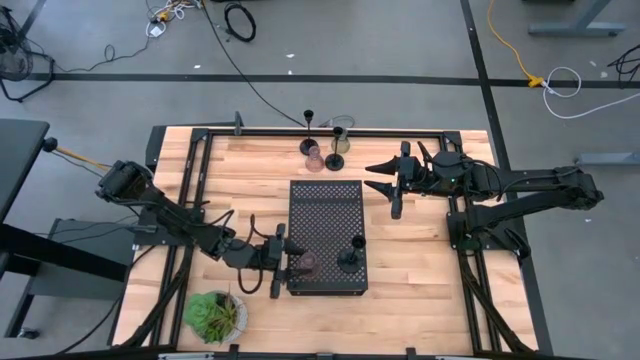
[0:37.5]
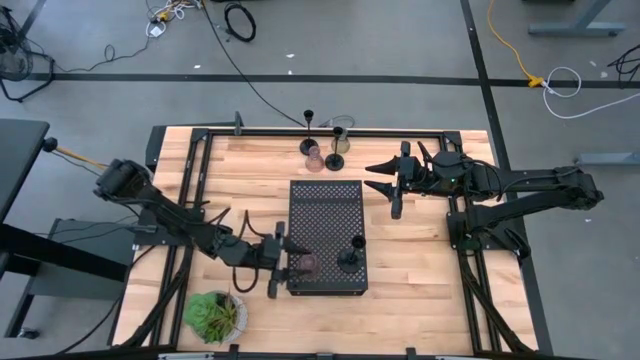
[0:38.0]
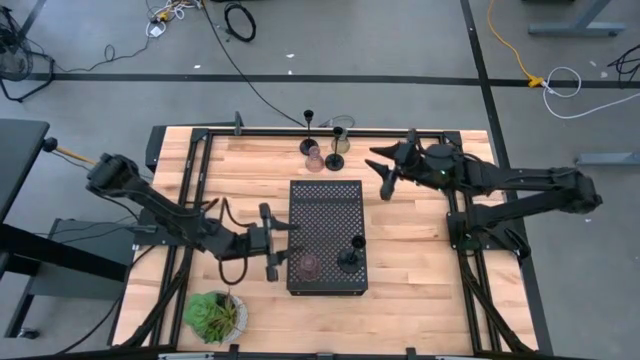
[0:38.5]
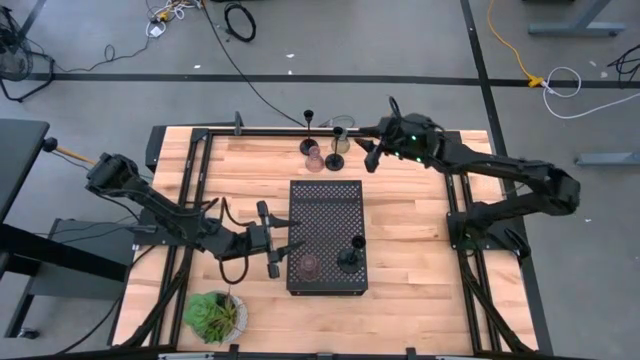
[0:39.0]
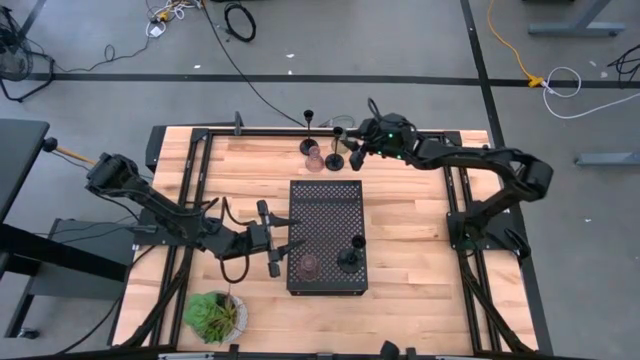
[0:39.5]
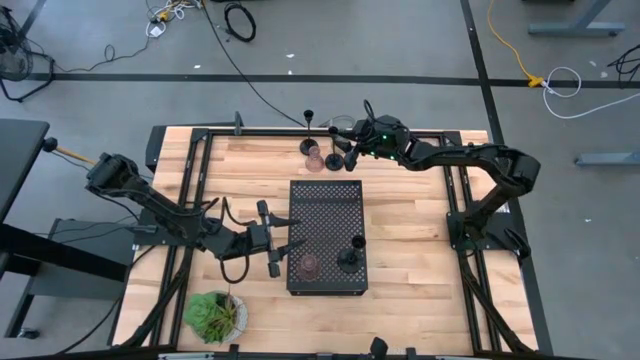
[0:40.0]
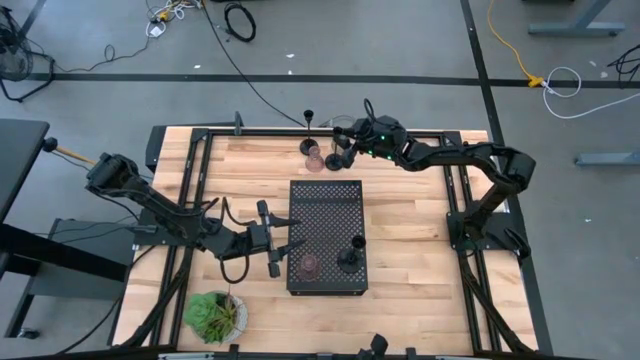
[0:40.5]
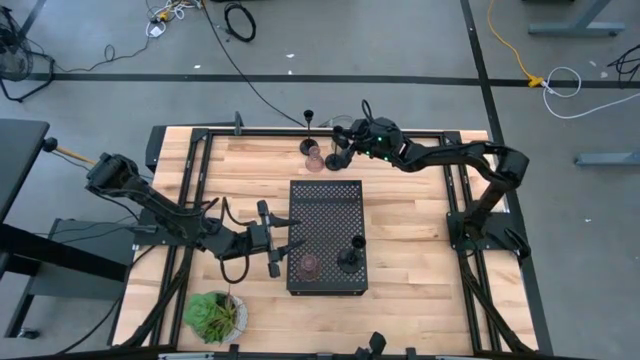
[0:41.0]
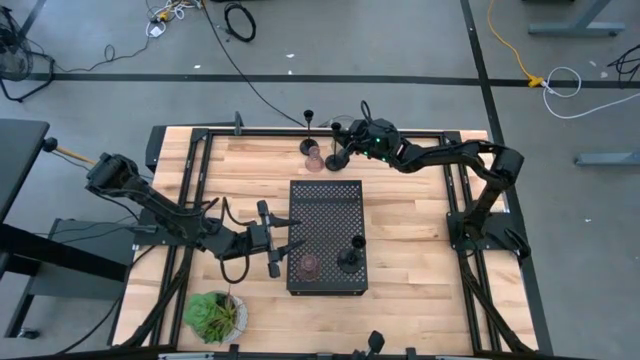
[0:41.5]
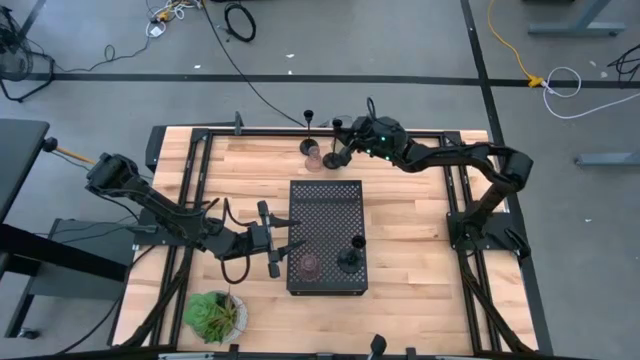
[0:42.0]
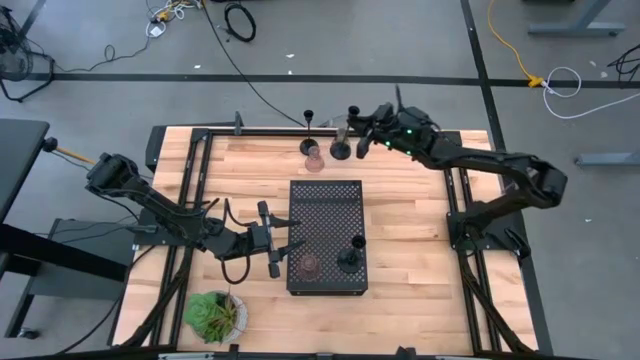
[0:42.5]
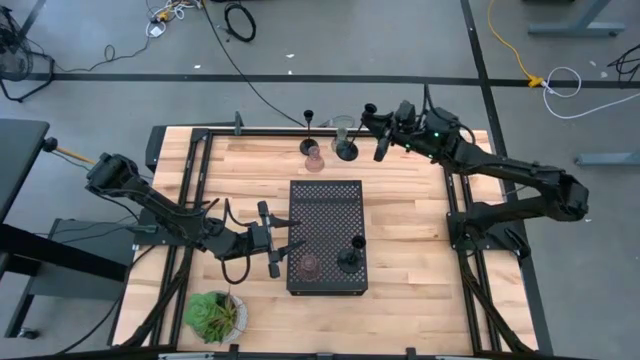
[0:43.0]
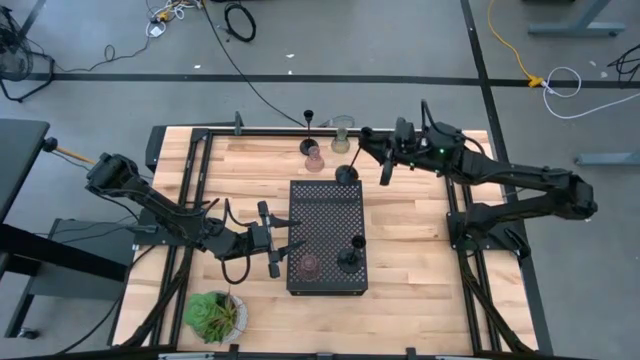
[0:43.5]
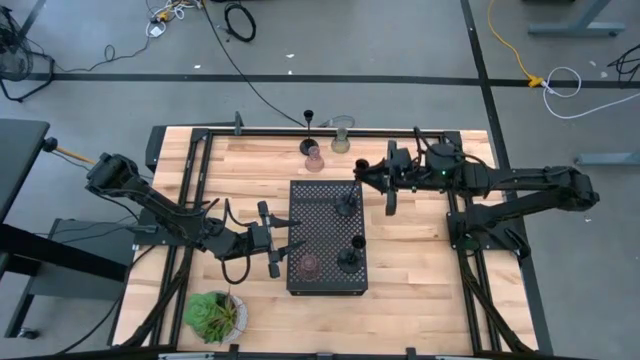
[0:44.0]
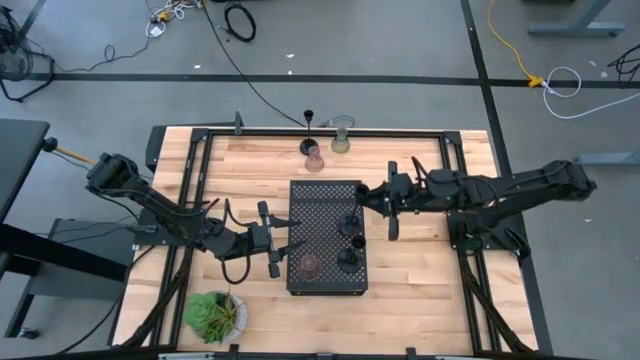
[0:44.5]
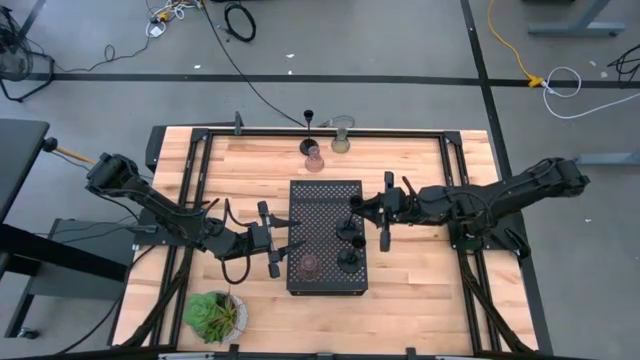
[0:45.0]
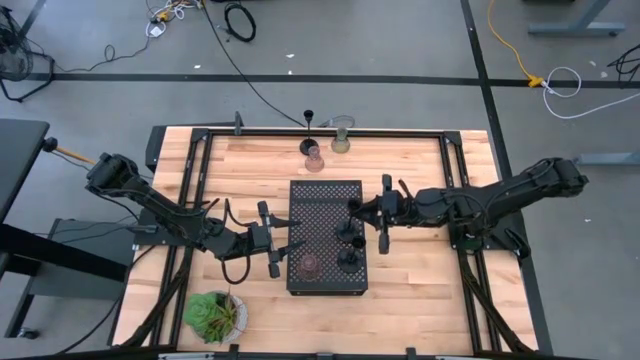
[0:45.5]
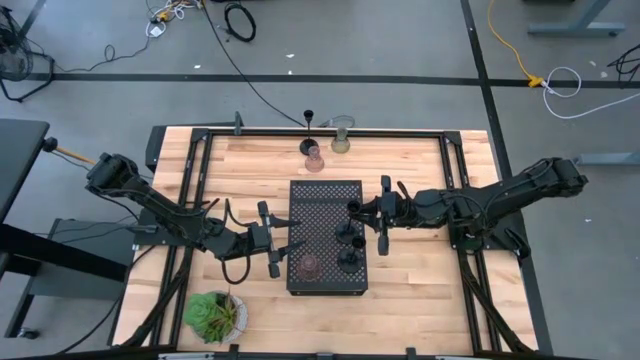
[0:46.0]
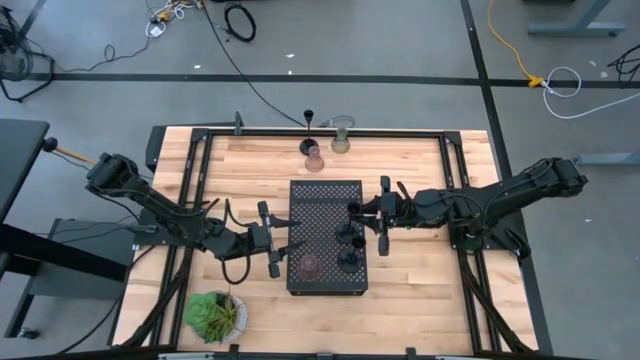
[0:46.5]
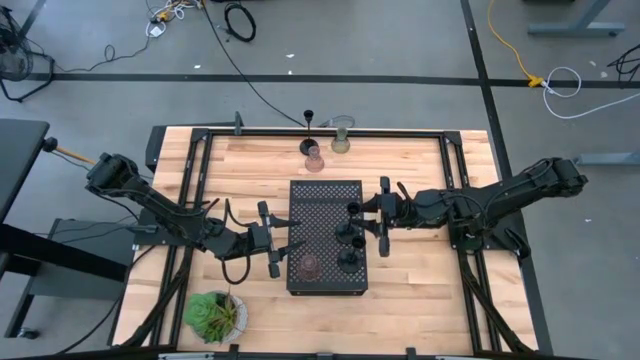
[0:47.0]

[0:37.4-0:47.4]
Task: Pick & Place candle stick holders
Put the right black candle holder on the shelf aligned with the other black candle holder

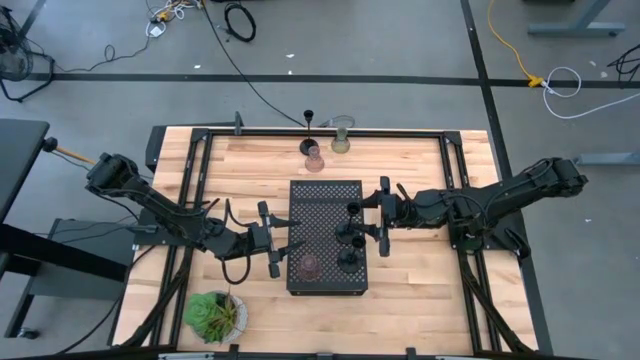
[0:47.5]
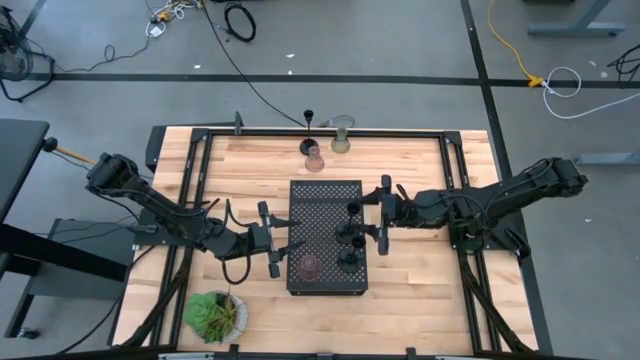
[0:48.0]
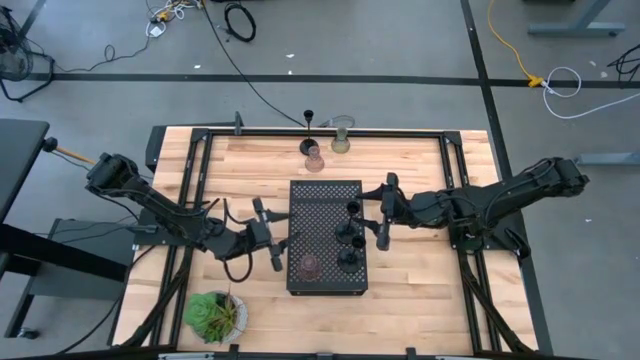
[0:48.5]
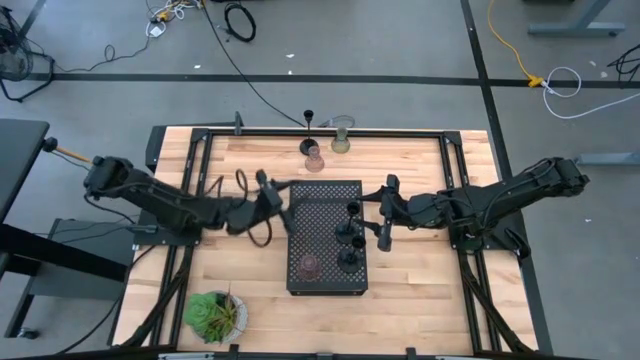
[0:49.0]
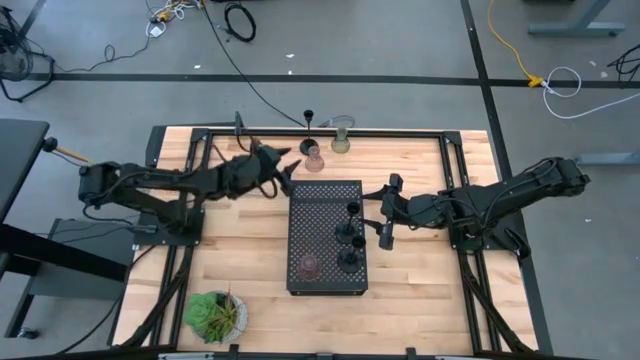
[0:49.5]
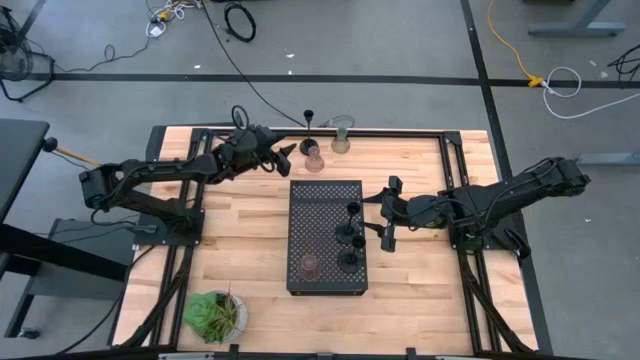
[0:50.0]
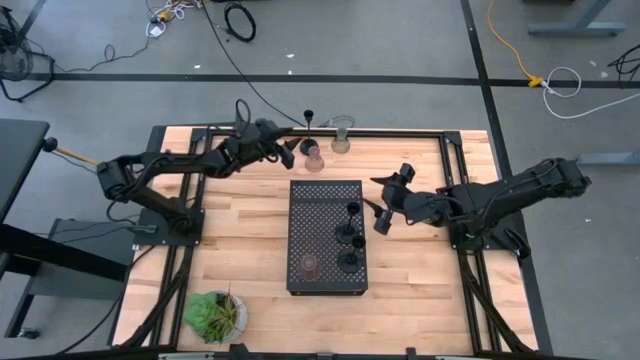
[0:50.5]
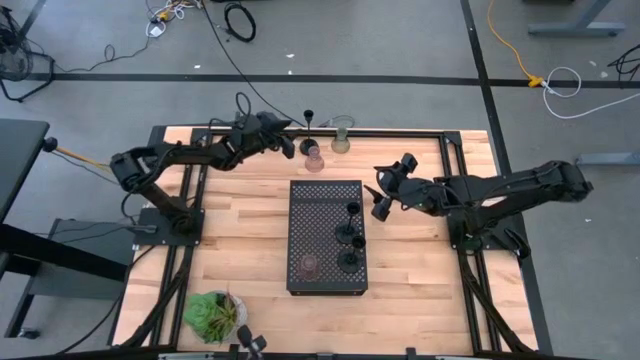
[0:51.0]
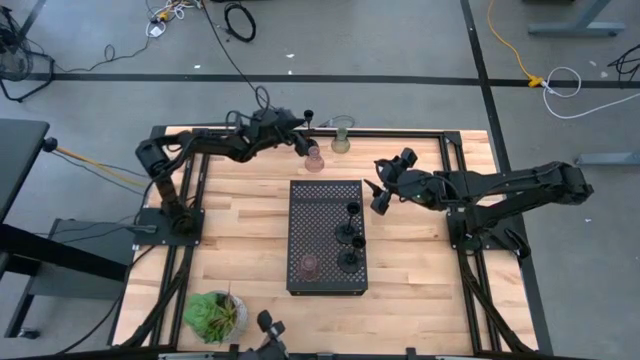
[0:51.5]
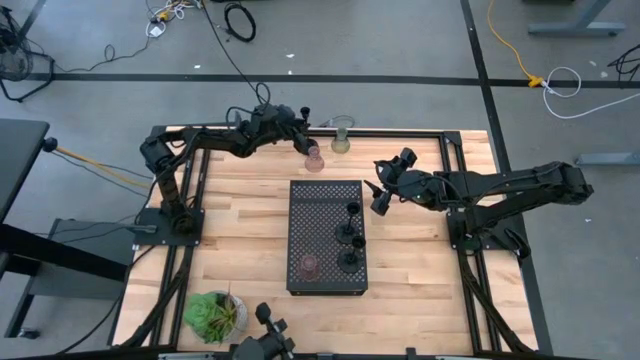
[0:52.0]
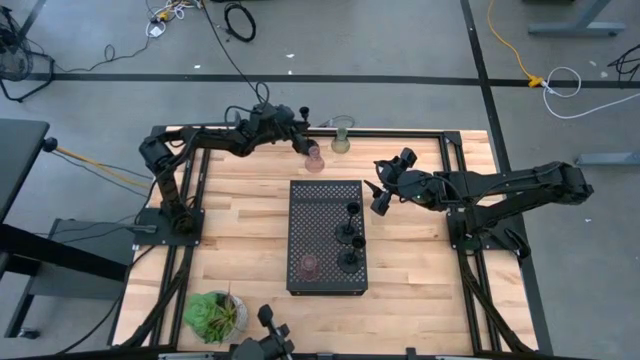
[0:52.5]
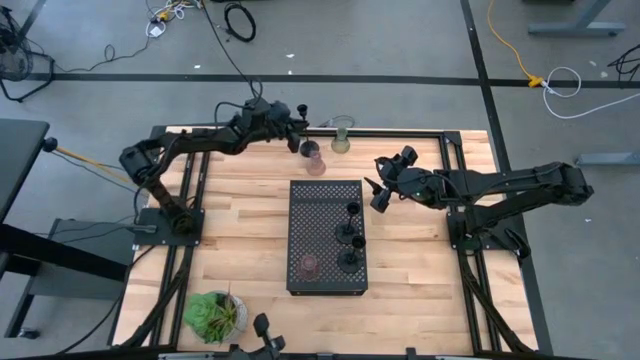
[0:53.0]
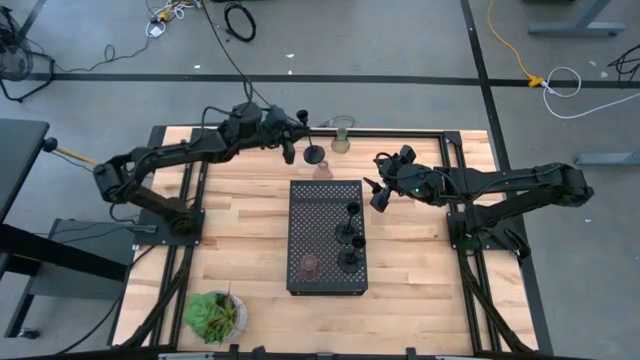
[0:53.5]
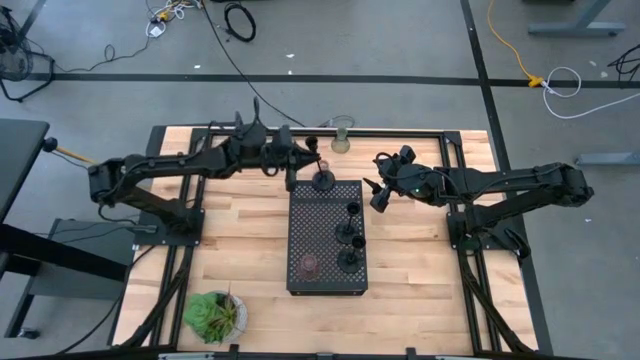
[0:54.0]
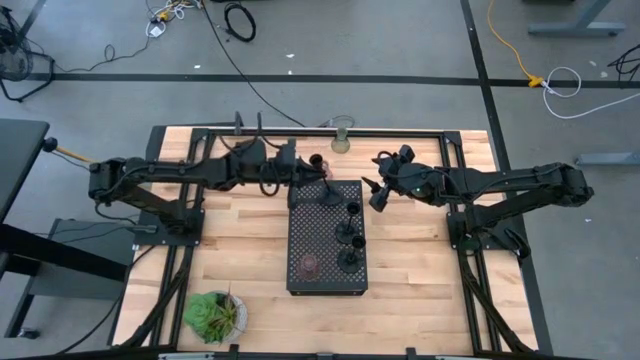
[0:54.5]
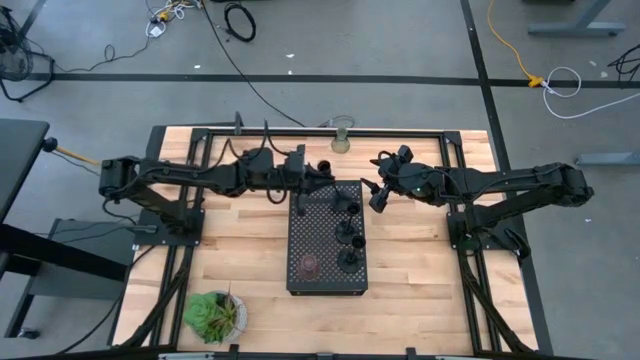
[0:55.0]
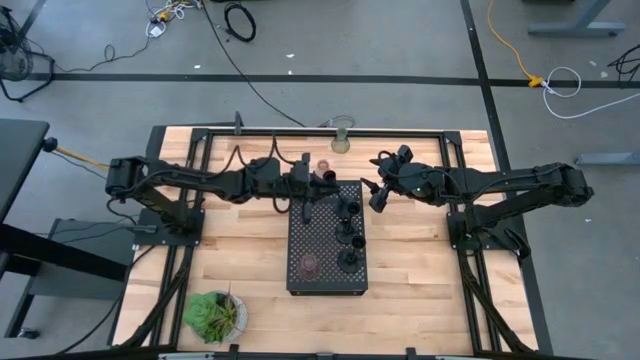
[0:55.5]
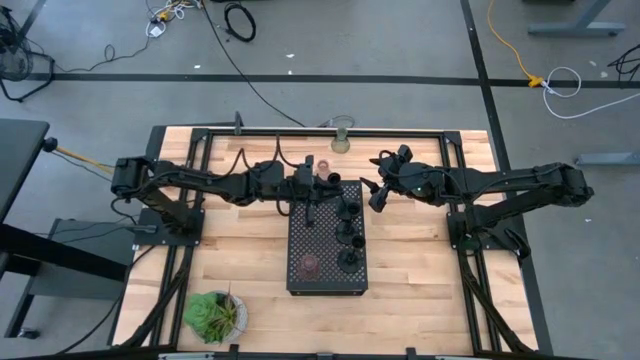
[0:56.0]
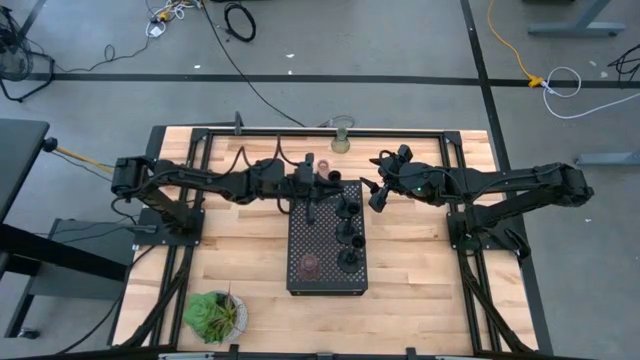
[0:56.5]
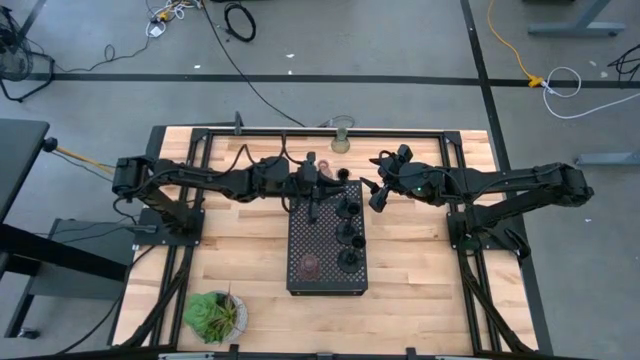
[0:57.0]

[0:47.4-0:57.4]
Put the right black candle holder on the shelf aligned with the other black candle holders

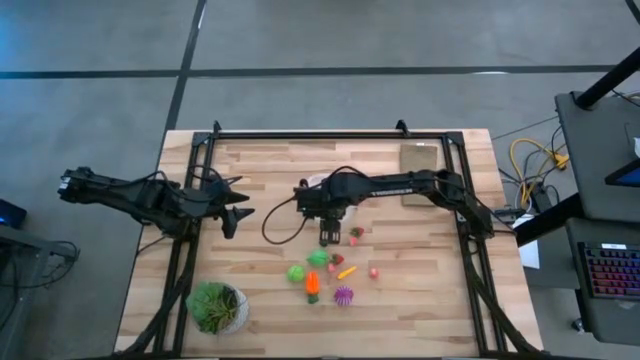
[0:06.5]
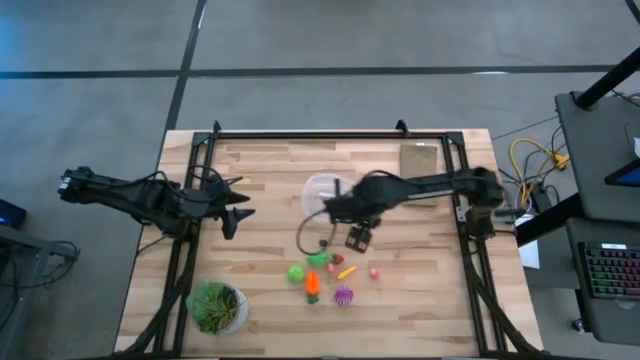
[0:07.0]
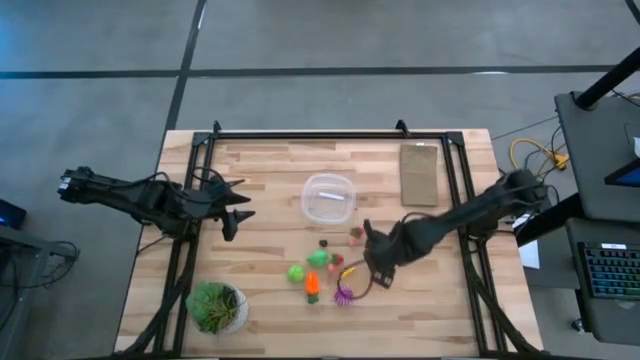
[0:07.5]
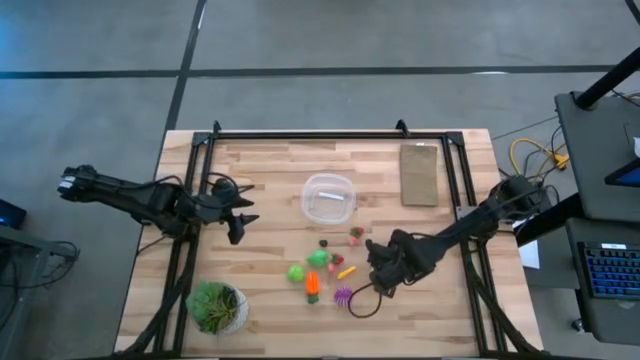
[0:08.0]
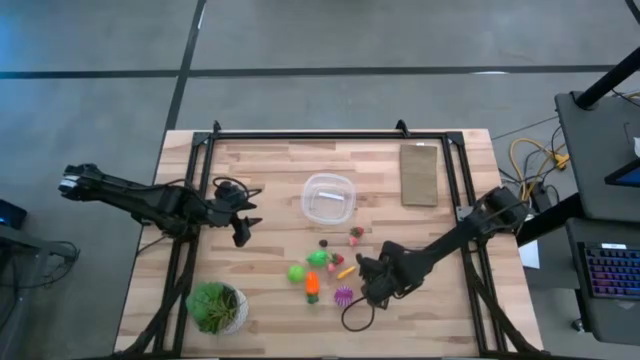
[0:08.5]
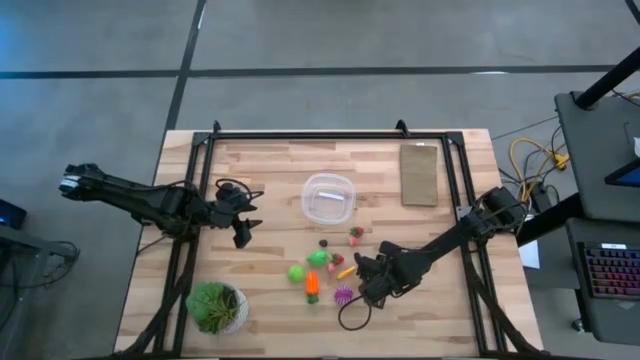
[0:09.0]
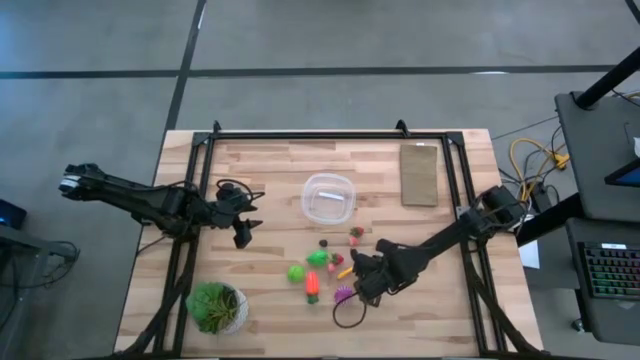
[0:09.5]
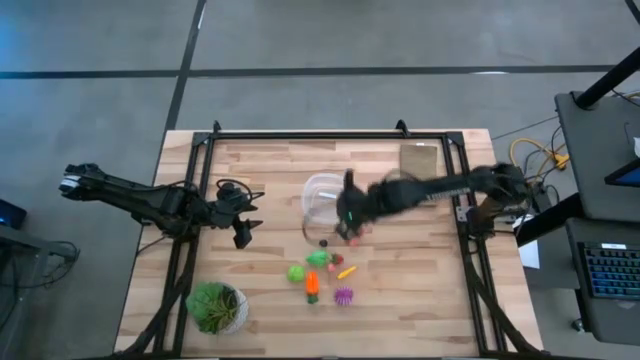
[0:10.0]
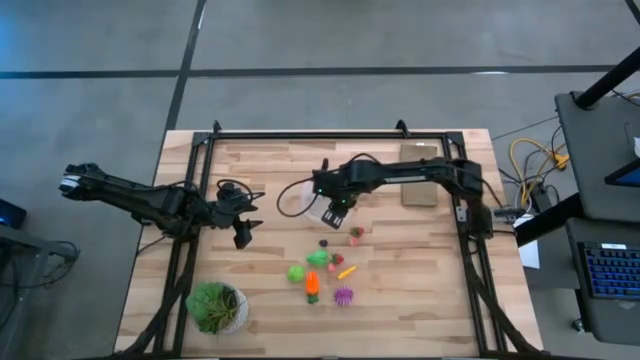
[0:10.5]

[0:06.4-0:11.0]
Task: Pick and placing Produce into tupperware
Put the right pink peach into the transparent container
